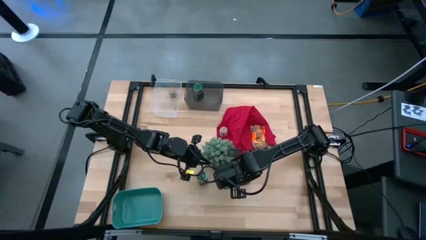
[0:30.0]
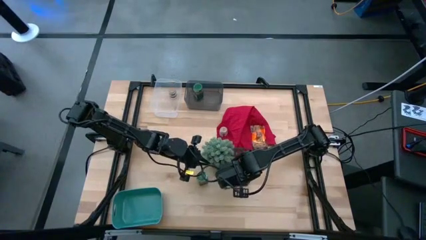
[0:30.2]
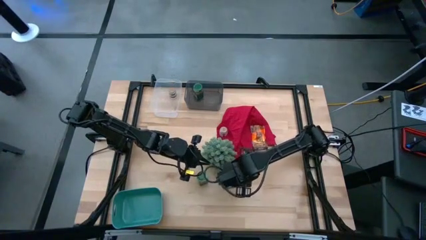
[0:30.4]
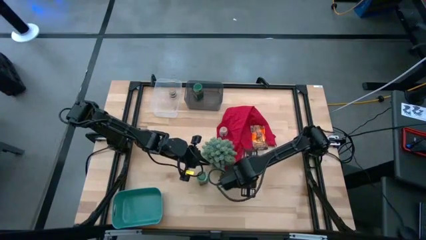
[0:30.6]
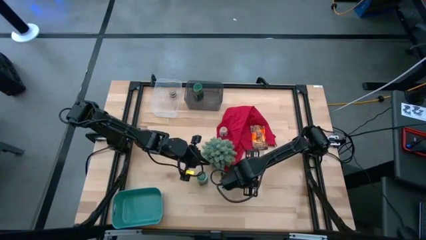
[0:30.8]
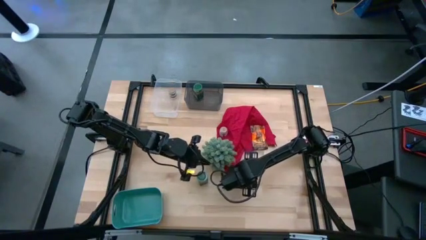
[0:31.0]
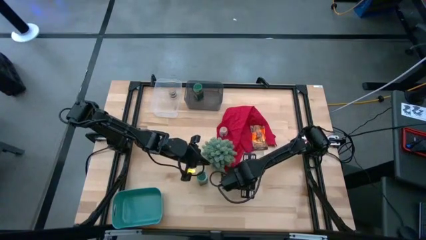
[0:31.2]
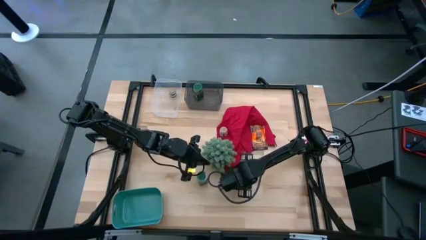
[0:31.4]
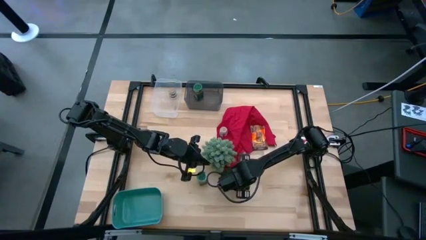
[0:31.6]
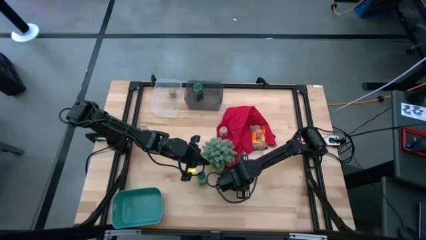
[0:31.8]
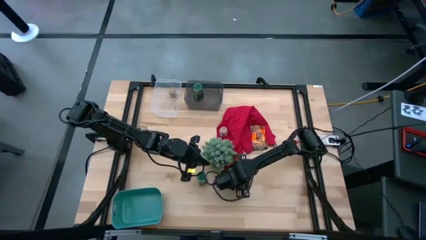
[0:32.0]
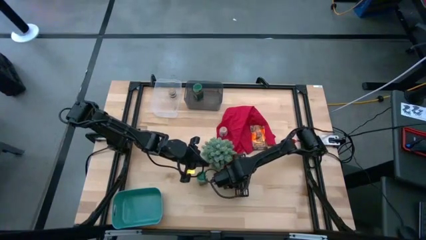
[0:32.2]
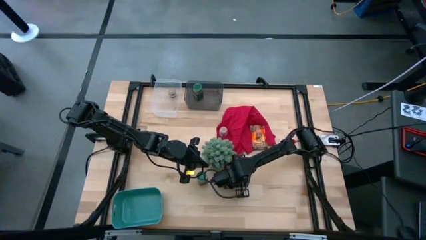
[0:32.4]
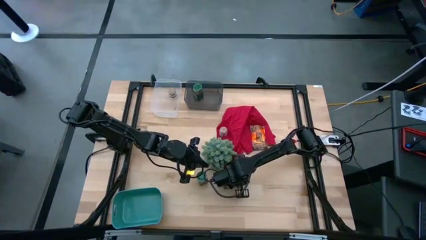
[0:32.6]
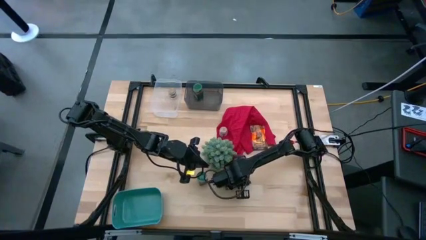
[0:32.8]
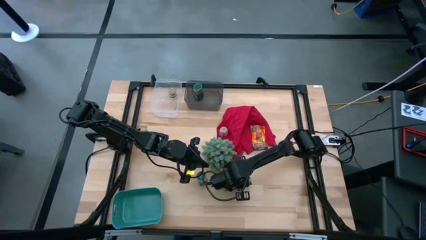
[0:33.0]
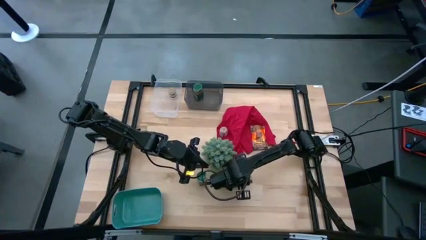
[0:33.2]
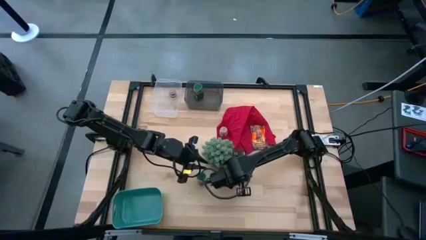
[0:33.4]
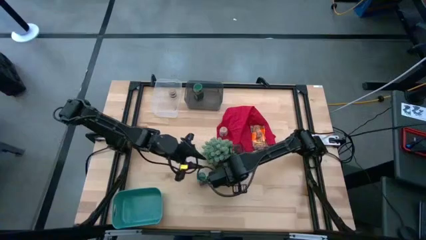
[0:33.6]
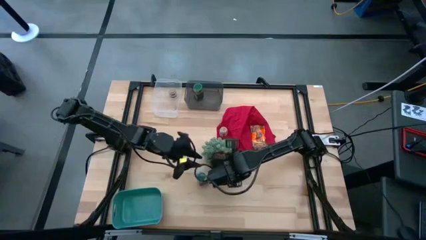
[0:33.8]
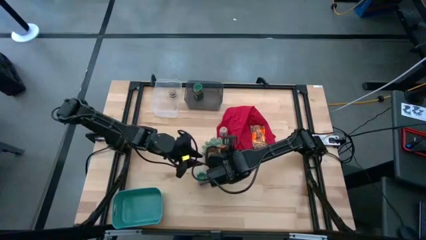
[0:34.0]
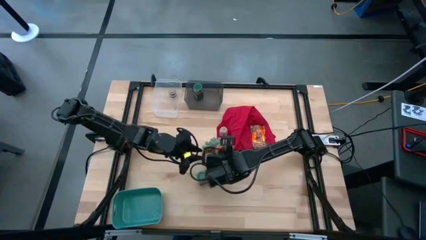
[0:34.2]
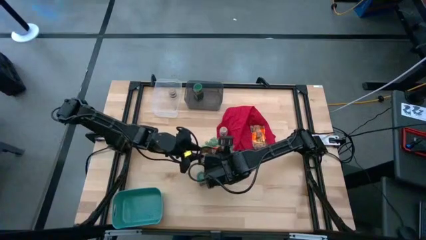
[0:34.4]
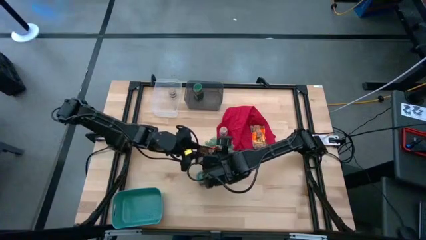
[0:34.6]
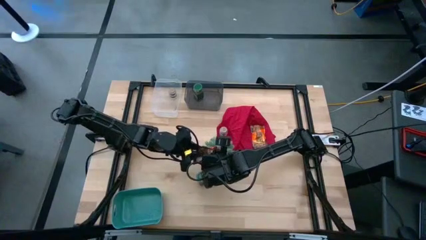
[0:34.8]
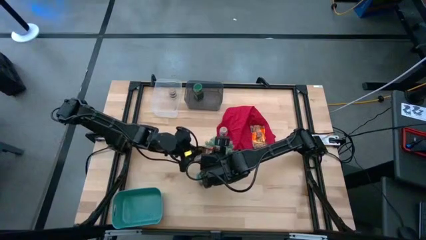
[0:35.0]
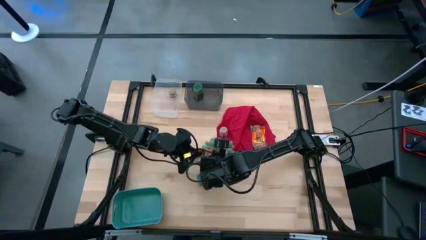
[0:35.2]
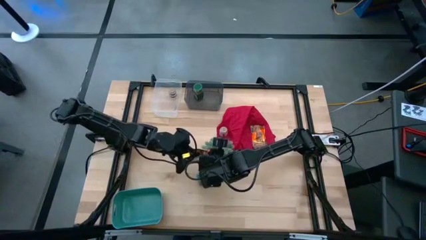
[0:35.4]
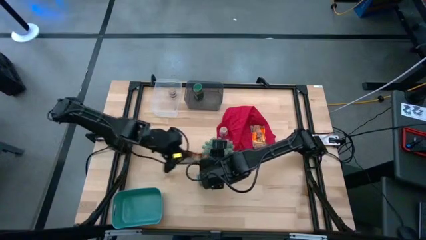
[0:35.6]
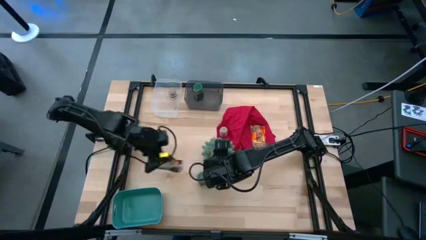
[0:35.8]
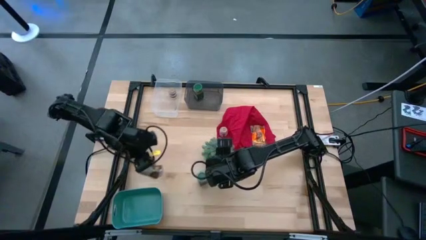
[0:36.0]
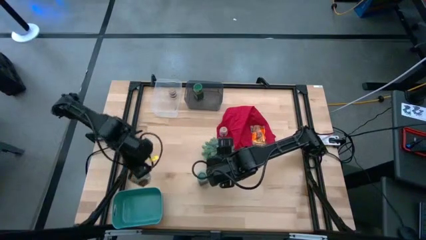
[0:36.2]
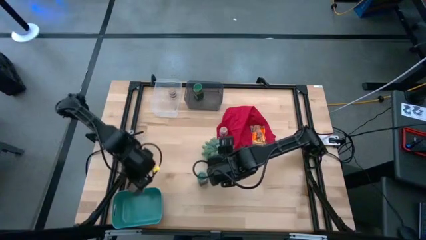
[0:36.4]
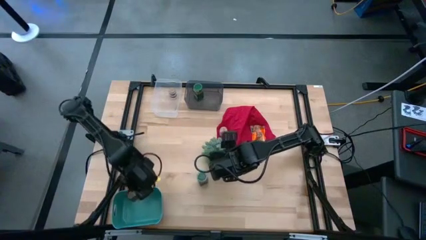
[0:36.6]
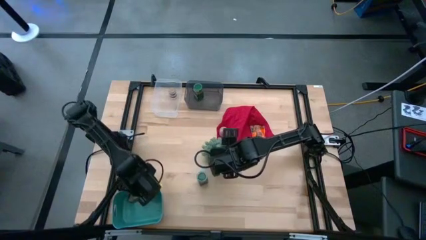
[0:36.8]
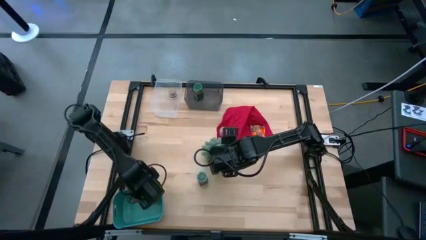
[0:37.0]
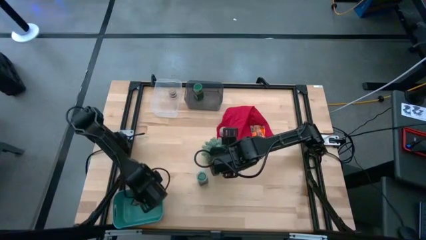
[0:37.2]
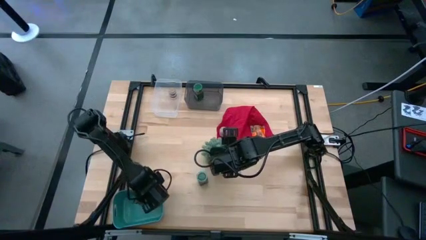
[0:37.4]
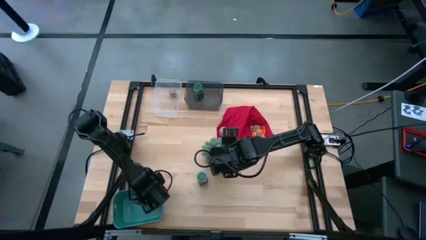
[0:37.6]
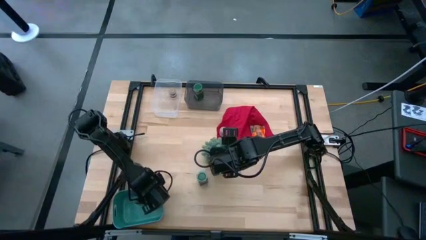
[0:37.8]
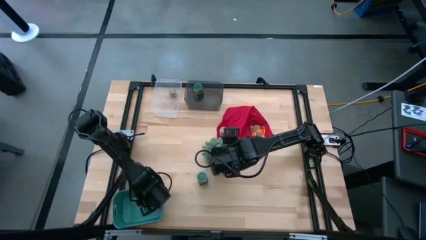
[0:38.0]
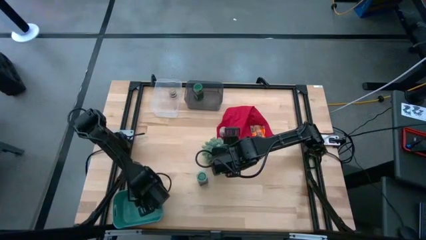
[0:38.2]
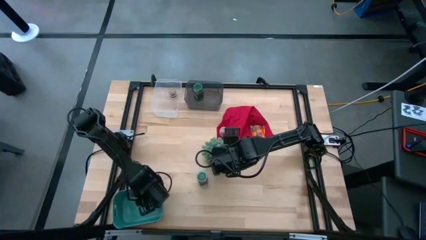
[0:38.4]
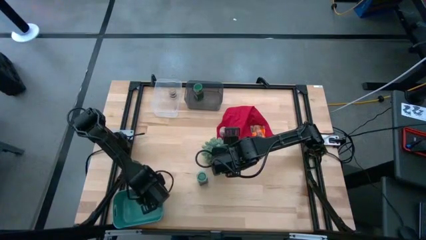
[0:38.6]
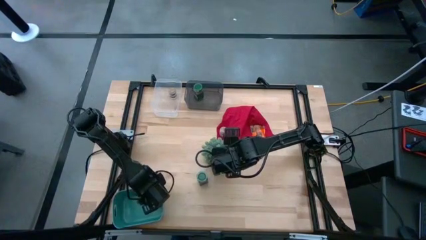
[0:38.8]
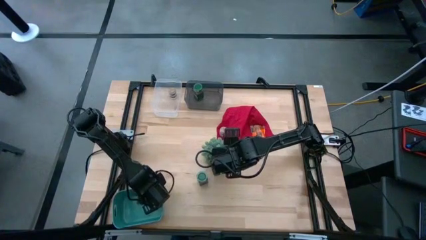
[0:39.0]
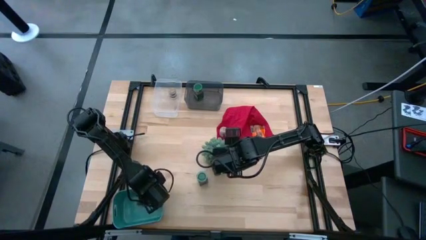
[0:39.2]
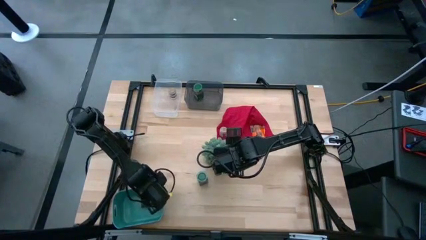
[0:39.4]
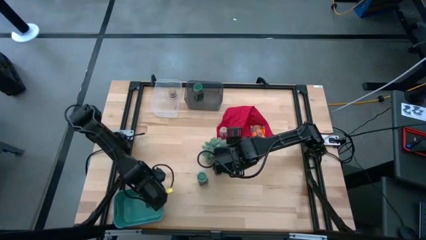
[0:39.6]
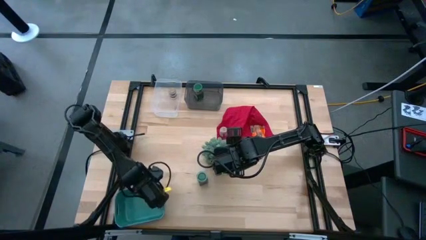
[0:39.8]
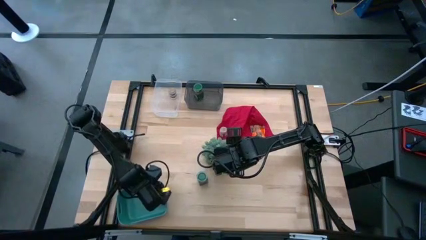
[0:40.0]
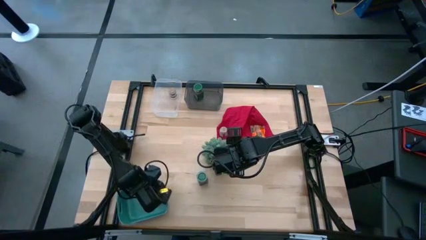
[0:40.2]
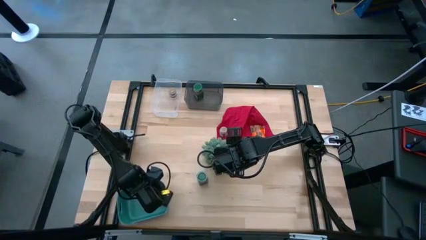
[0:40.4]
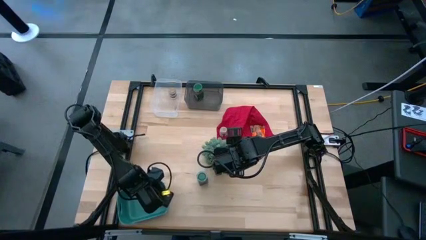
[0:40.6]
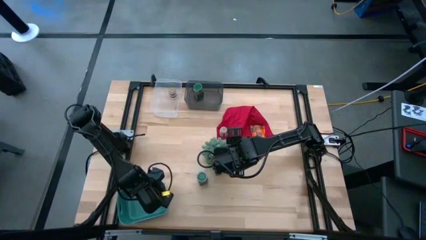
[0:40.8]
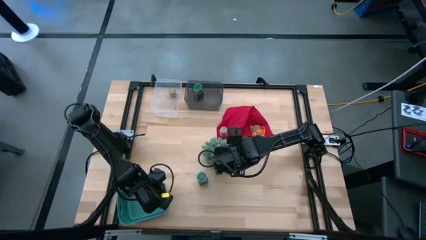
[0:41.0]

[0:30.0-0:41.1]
Task: Sort spices by type
Put the bottom orange spice pack into the green bin

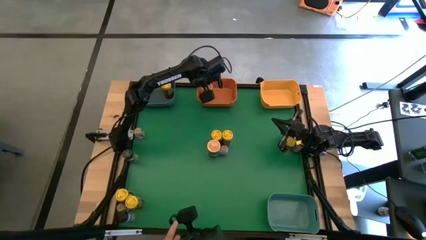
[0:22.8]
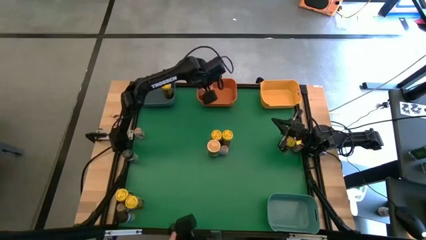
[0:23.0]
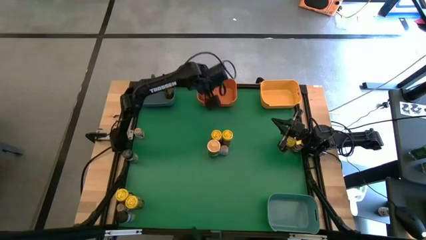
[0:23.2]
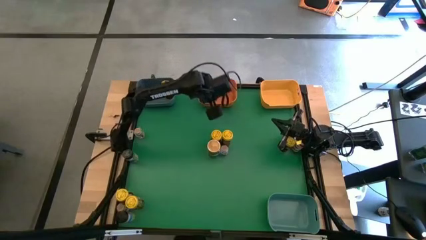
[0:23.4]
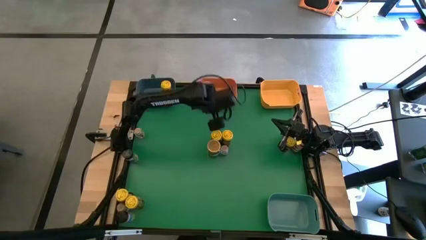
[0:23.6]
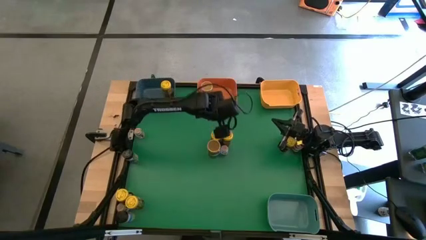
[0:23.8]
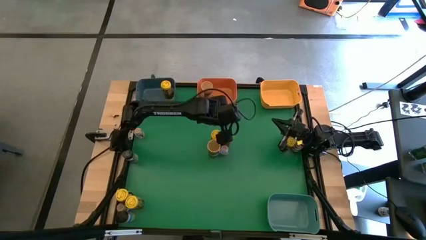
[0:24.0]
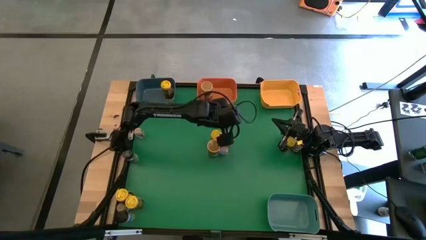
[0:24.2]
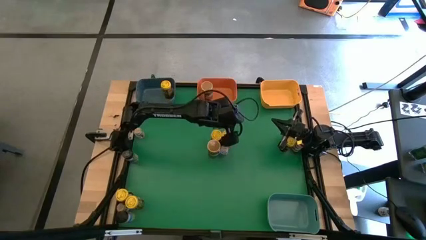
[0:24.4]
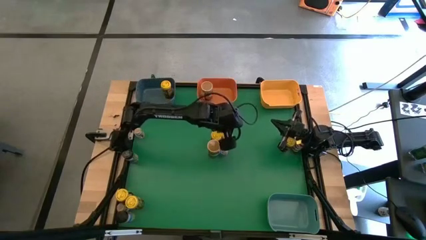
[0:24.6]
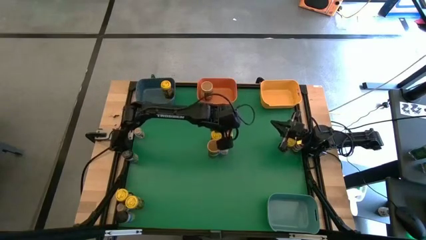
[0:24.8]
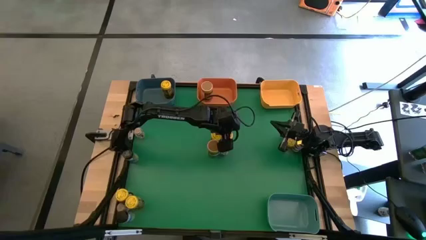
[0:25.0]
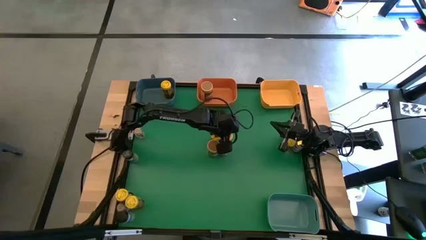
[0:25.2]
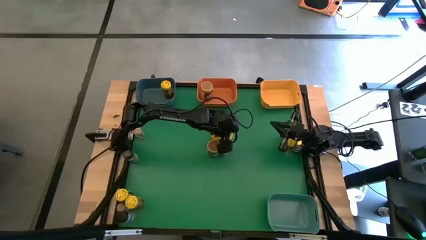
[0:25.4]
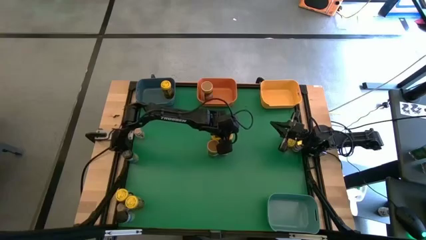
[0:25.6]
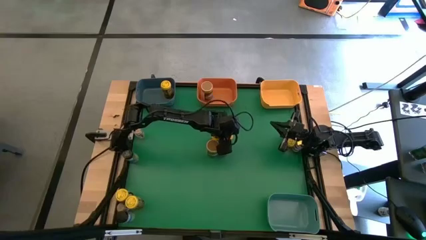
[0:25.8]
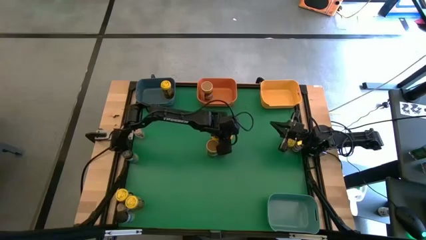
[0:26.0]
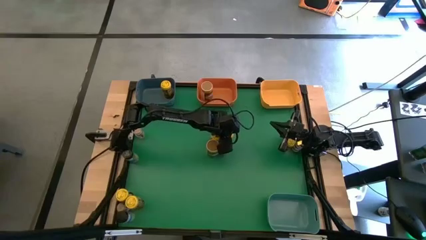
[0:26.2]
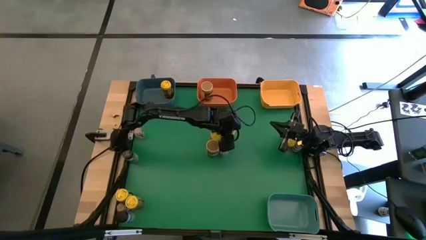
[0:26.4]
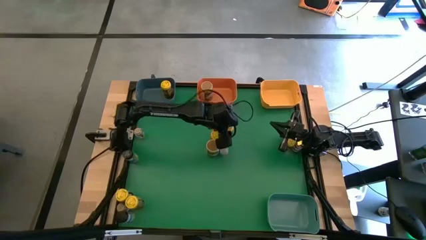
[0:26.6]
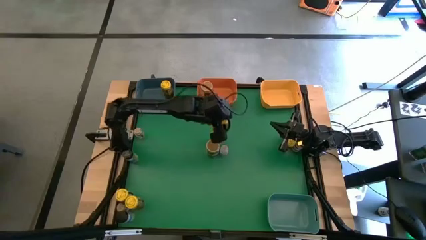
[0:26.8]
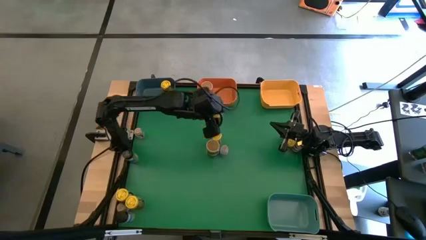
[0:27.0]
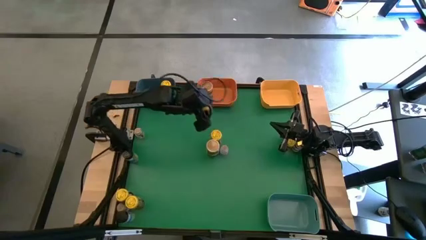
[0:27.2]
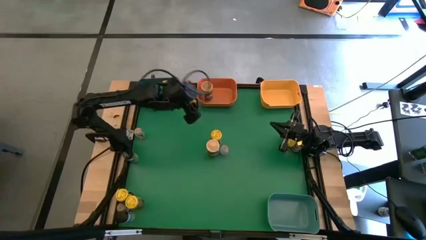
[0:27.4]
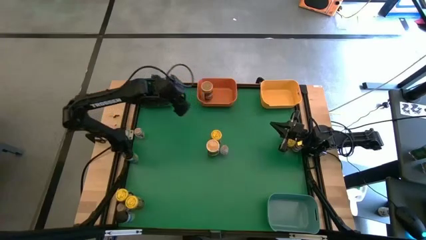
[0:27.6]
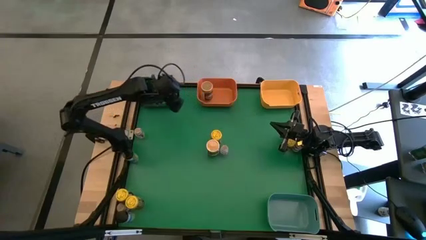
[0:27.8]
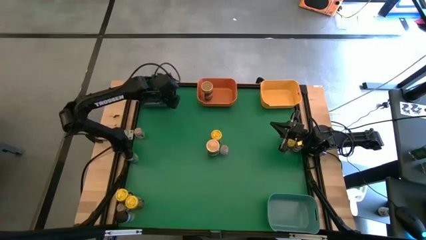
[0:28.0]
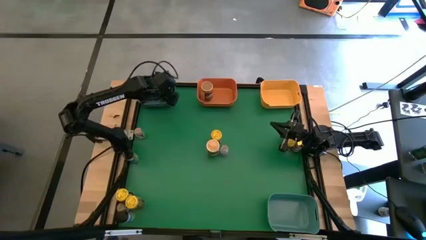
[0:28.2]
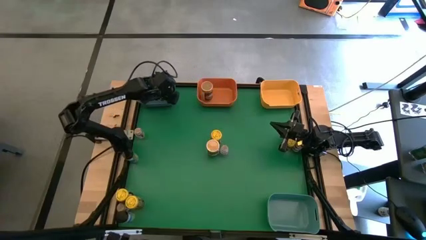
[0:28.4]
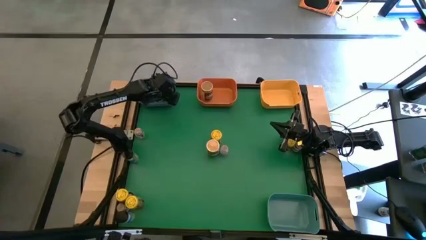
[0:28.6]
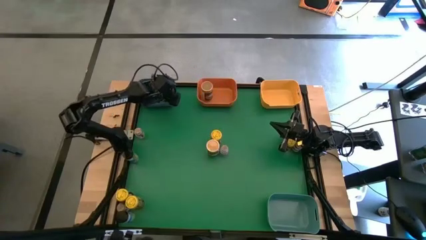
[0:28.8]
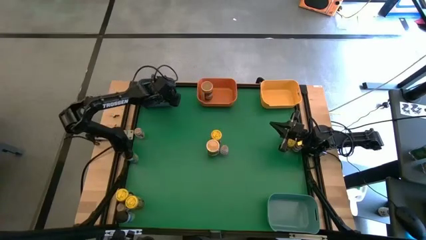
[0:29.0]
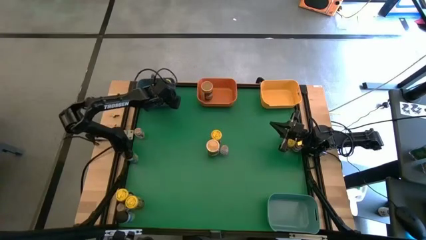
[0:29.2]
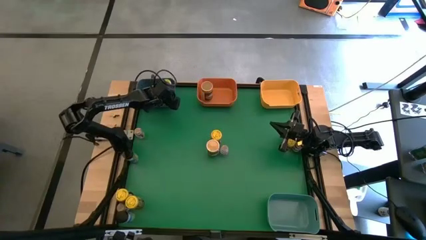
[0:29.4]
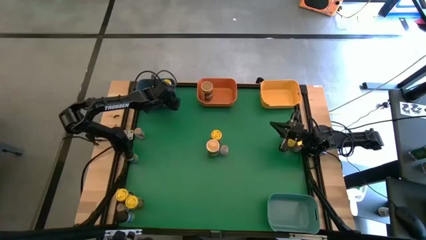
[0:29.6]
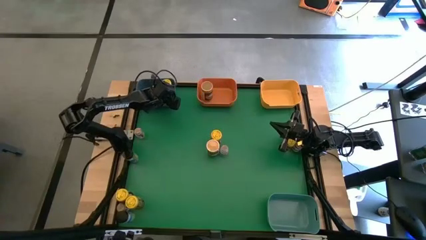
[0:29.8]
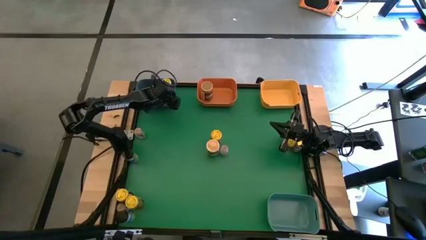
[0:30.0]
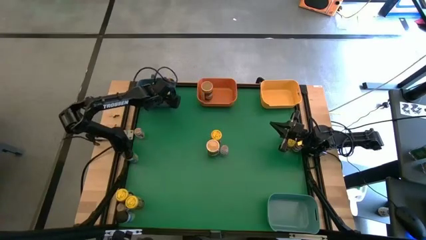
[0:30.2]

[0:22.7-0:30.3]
Task: Sort spices by type
Put the yellow seasoning bottle into the blue bin
